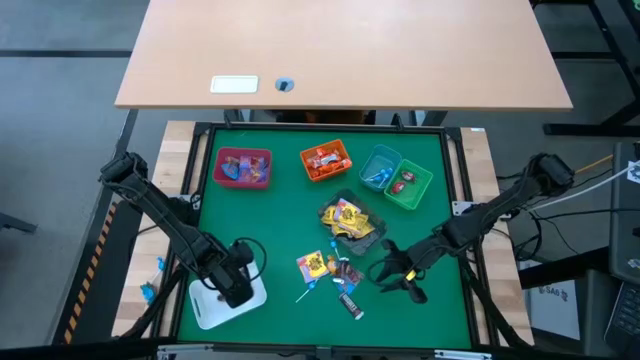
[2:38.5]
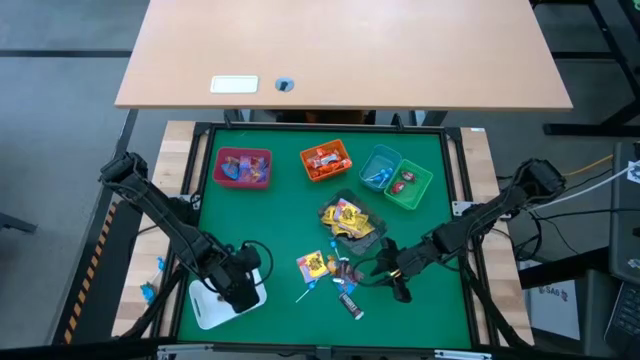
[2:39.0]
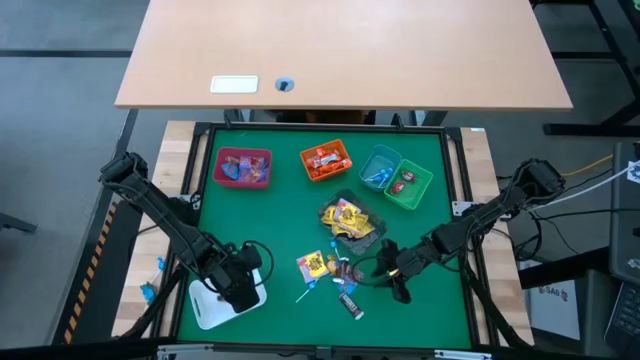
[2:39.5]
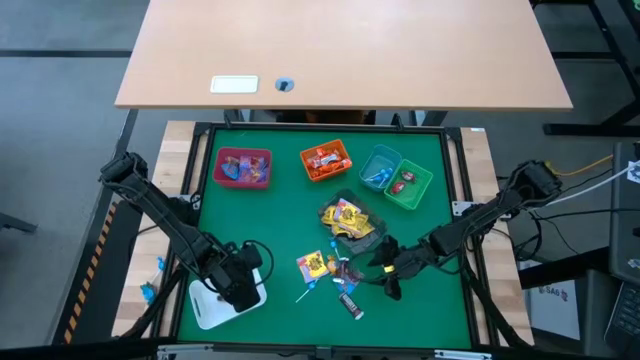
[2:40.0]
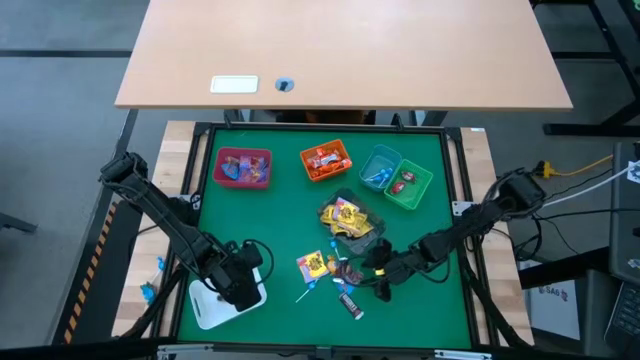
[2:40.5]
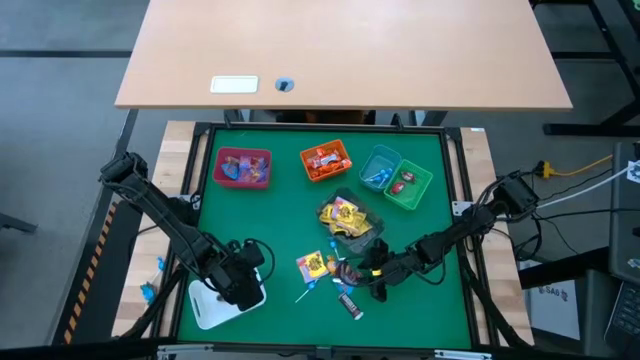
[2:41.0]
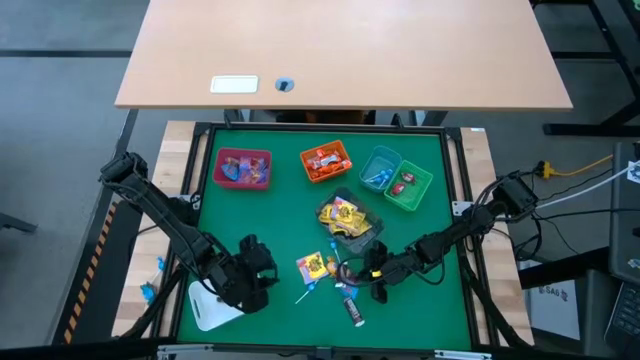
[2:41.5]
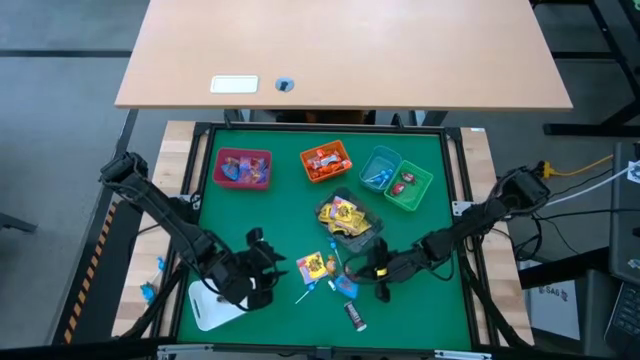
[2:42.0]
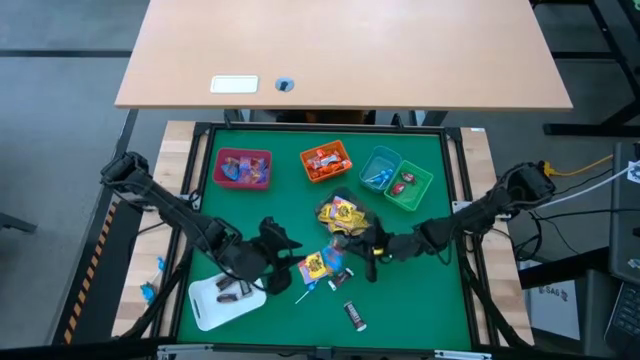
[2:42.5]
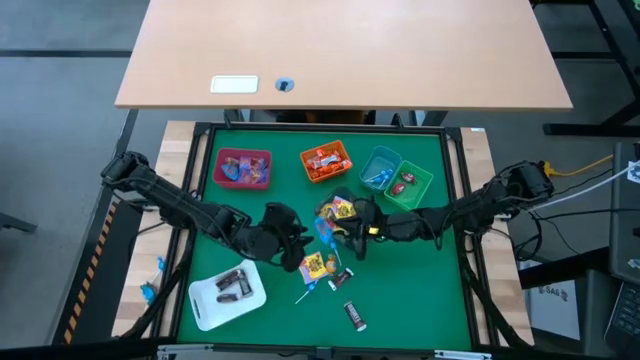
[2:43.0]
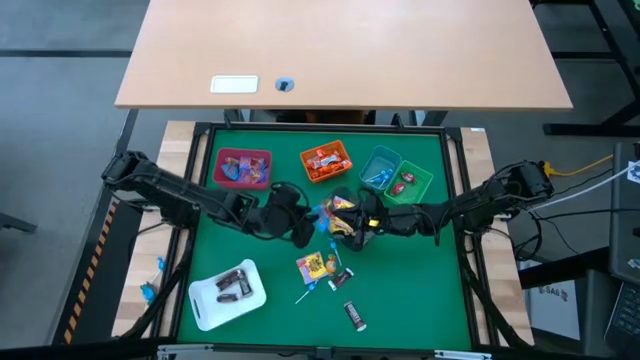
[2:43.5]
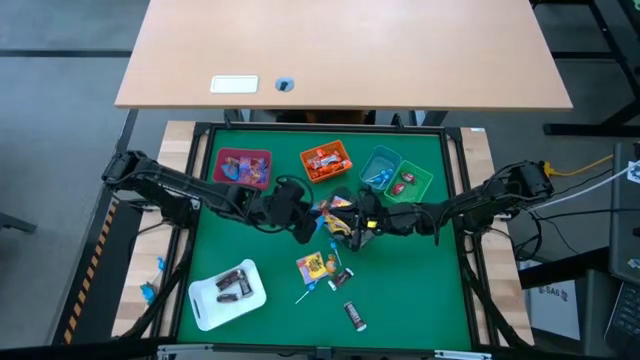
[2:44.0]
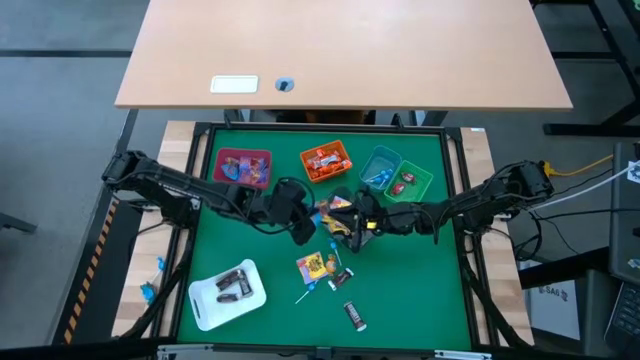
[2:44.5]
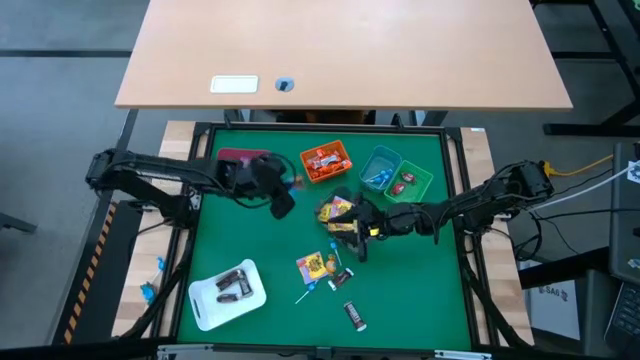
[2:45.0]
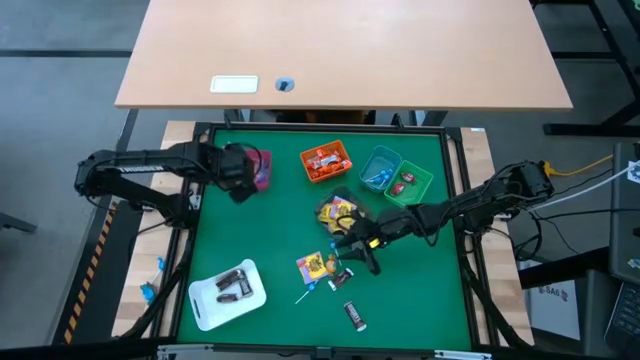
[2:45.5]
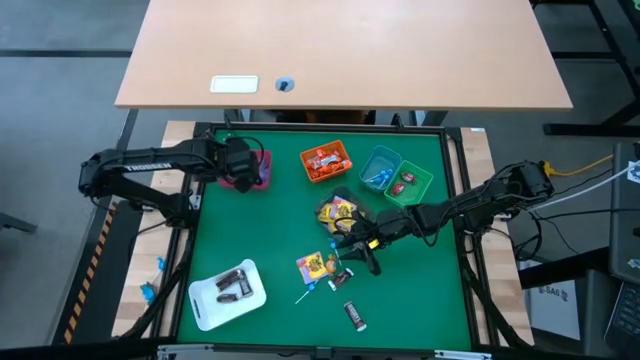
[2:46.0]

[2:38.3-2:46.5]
Task: Sort candy
Put the blue gummy pack into the red bin

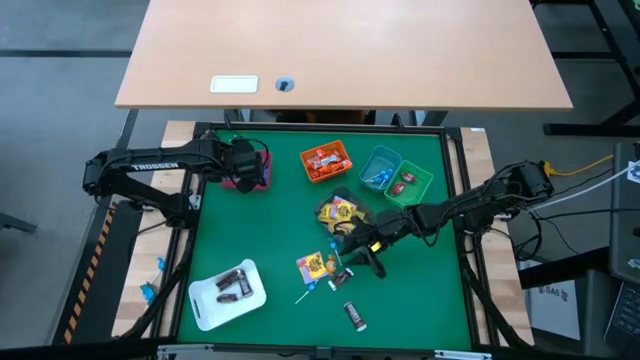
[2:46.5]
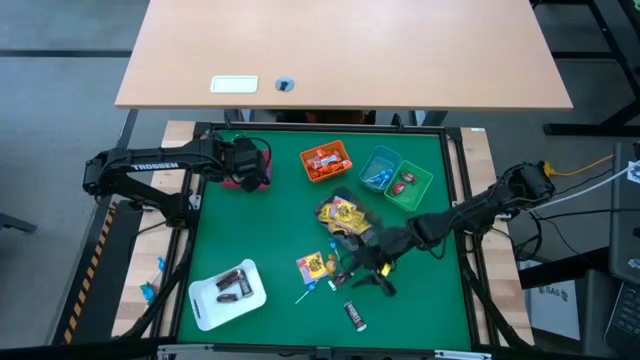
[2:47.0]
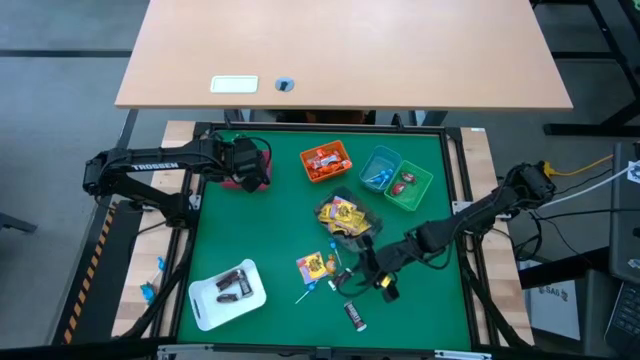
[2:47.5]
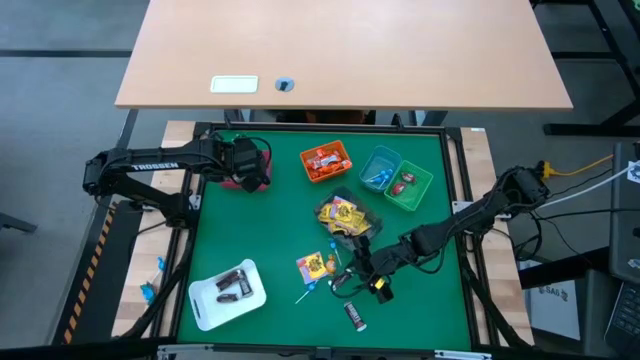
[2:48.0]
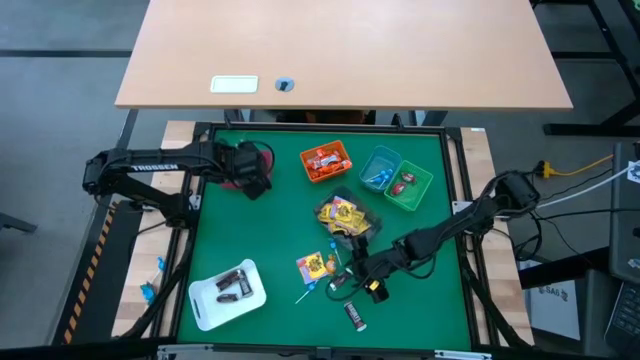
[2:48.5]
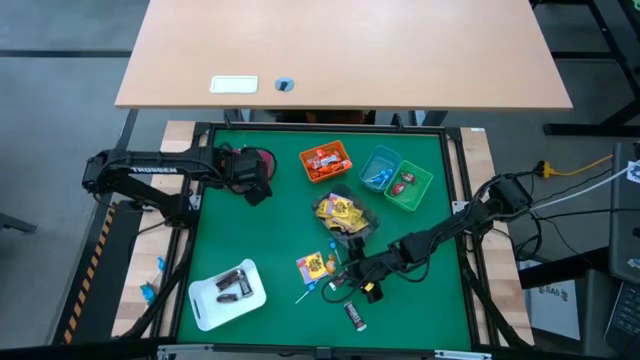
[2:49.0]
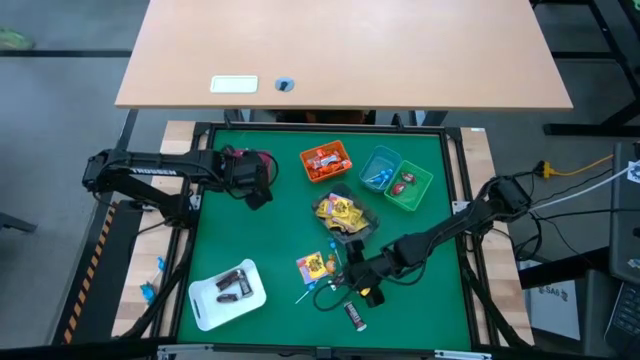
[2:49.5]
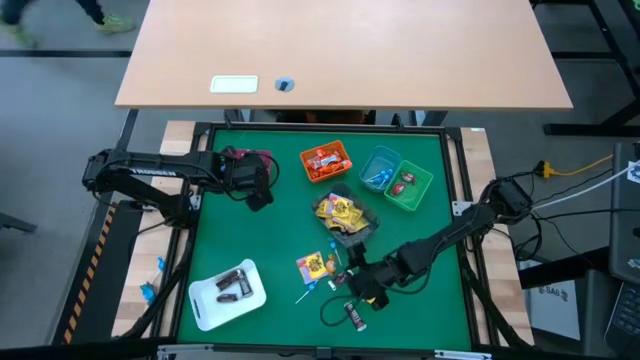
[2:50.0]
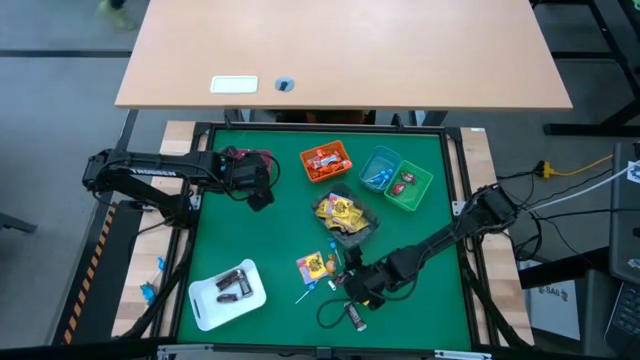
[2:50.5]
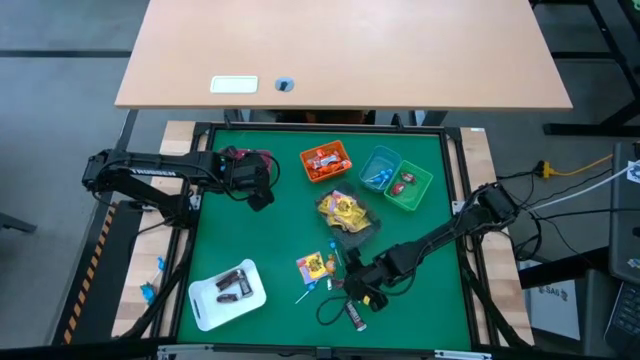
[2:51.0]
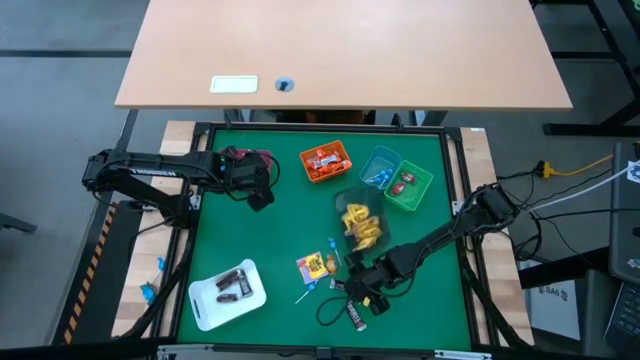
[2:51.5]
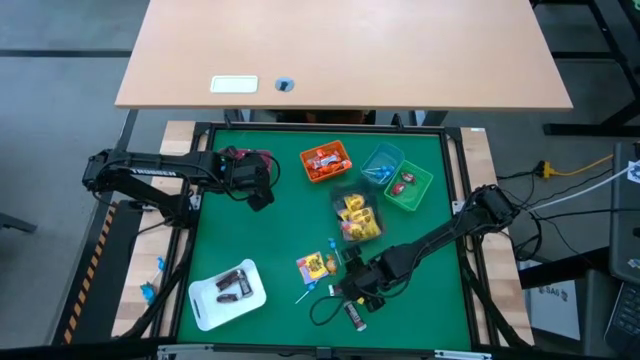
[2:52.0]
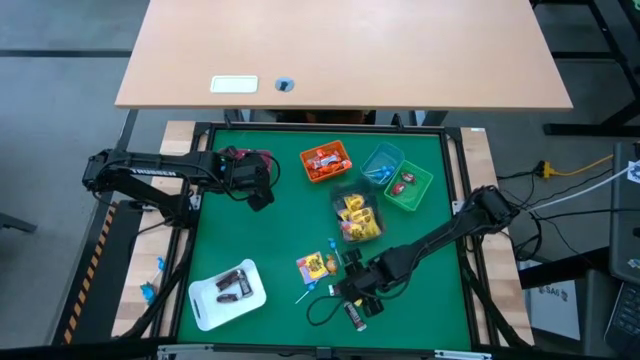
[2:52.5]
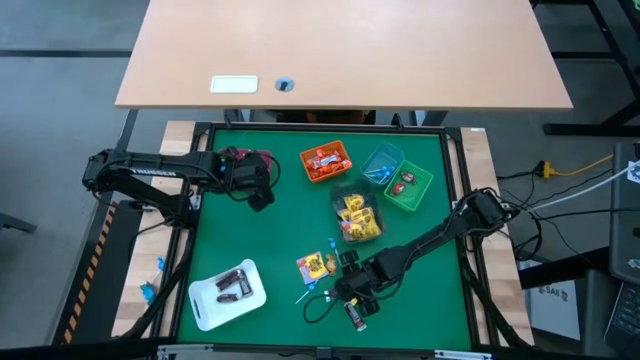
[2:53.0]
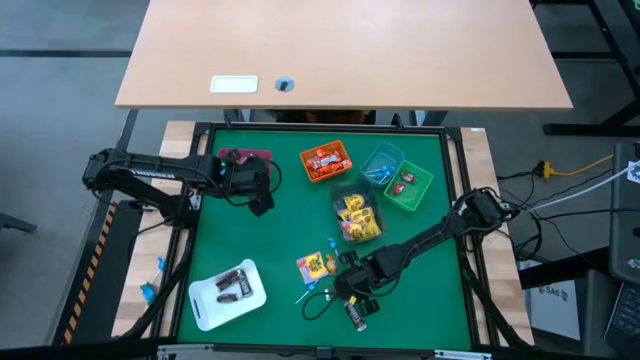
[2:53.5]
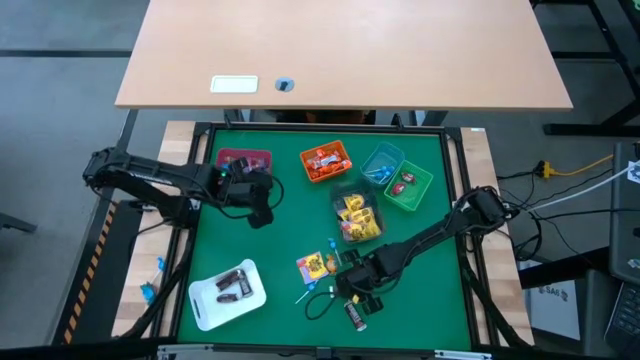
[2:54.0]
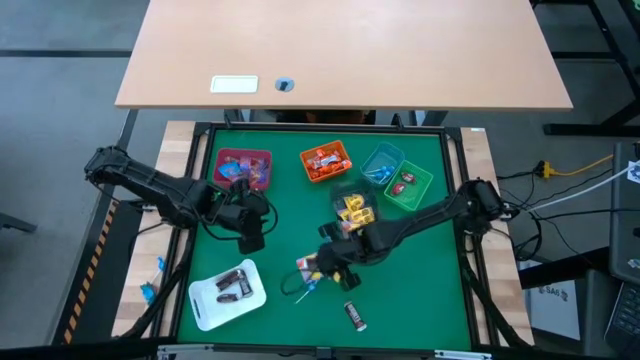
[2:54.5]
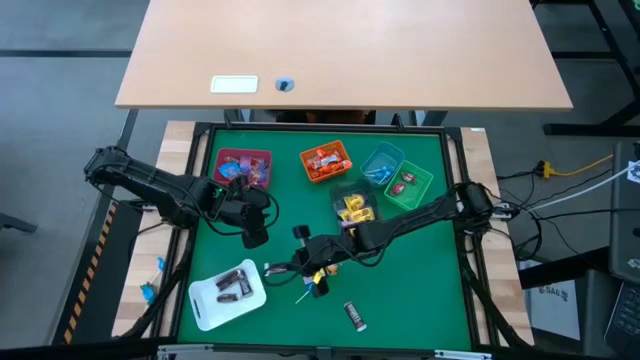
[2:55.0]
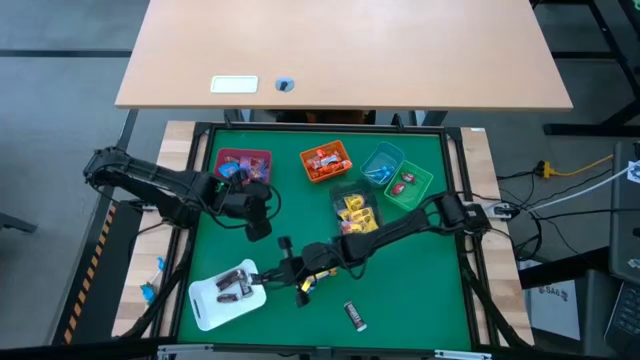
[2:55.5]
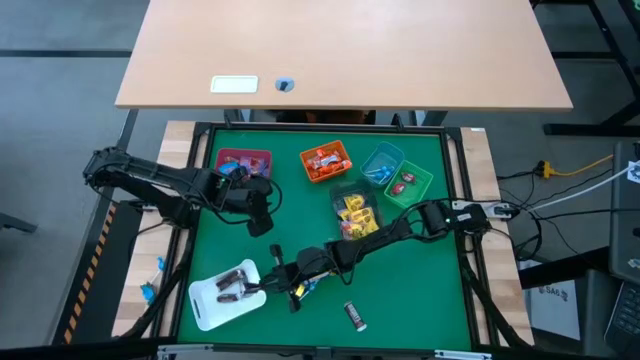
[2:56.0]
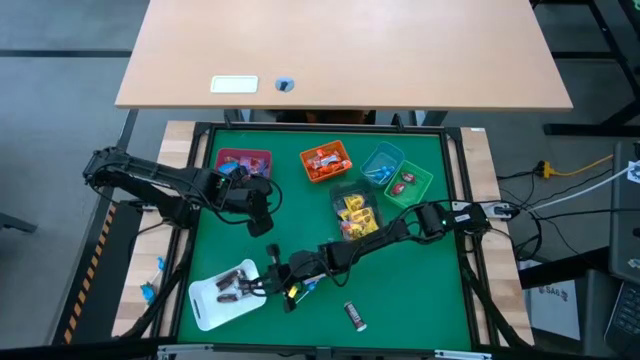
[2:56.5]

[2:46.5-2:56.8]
Put the brown chocolate into the white bin

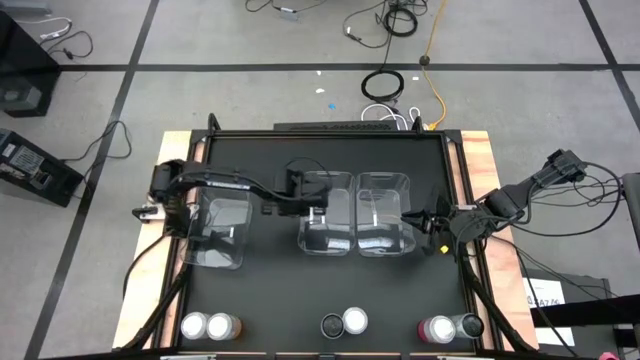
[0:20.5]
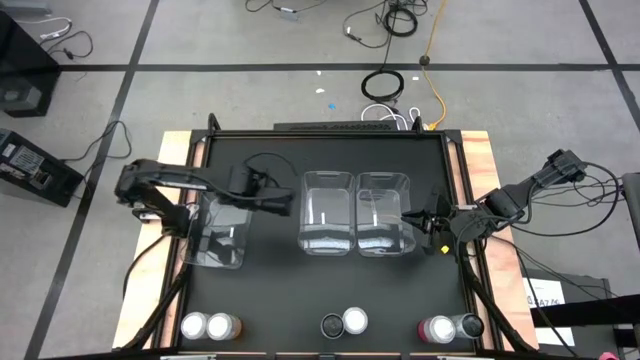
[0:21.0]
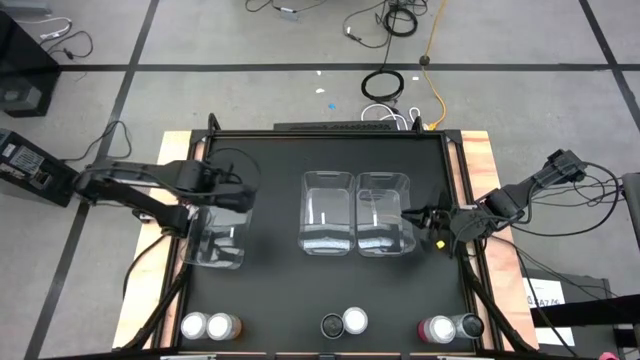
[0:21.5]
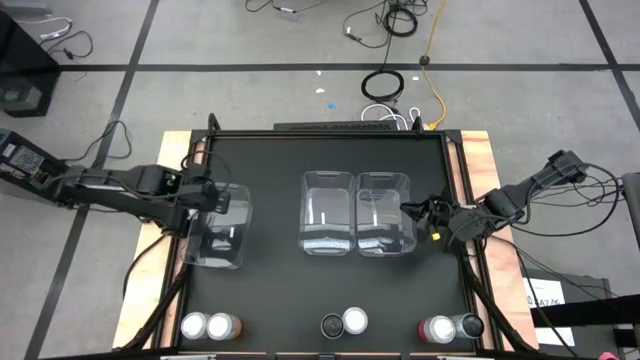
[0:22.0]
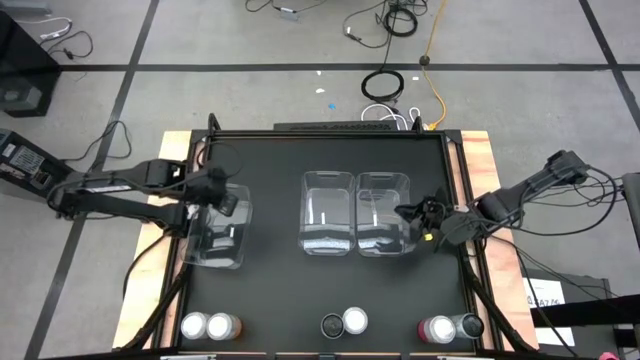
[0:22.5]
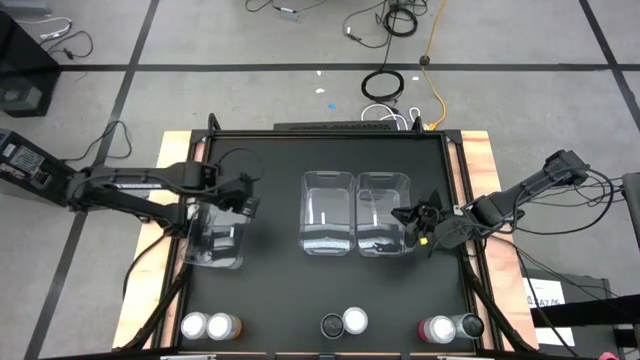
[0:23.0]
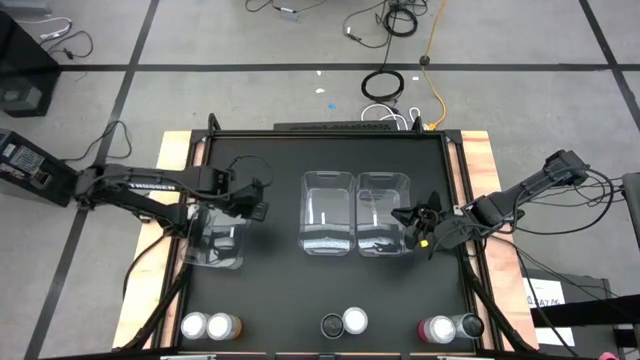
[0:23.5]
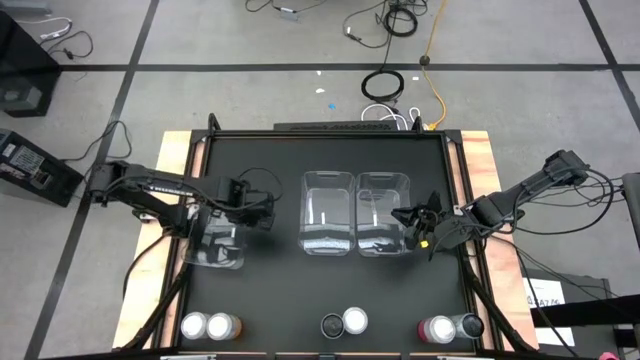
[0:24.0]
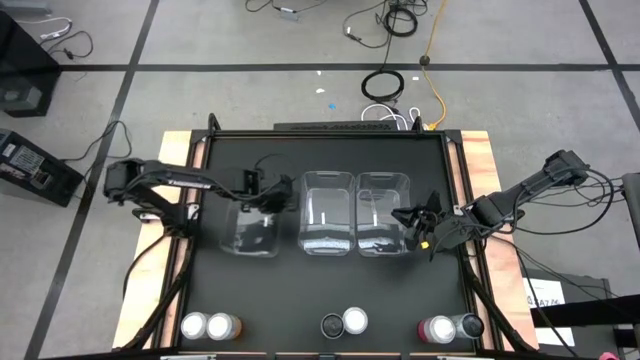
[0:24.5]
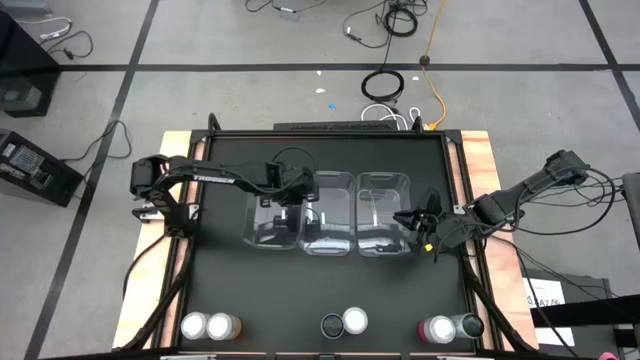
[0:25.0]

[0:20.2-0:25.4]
Task: Sort soda cans
Move the left transparent bin to the middle left of the table
